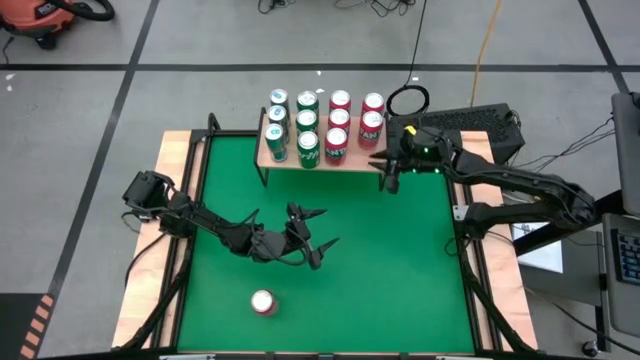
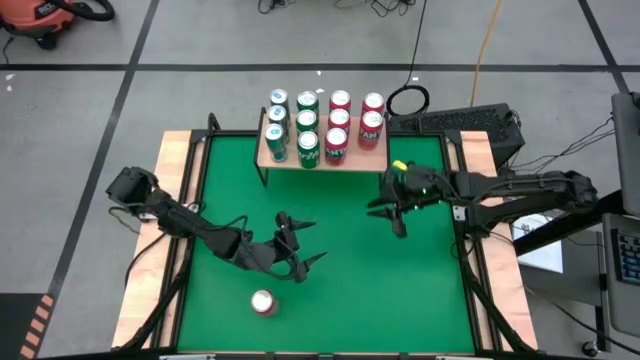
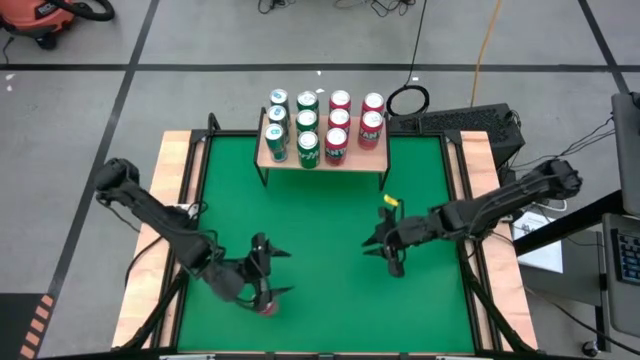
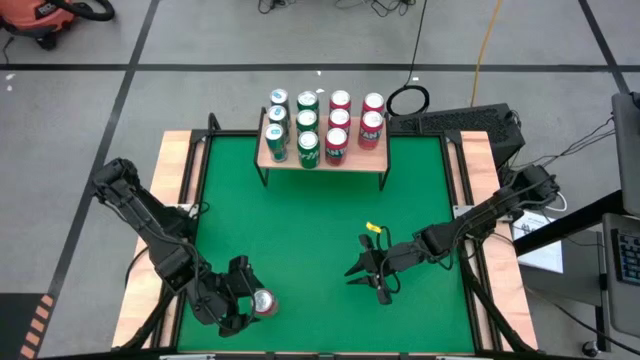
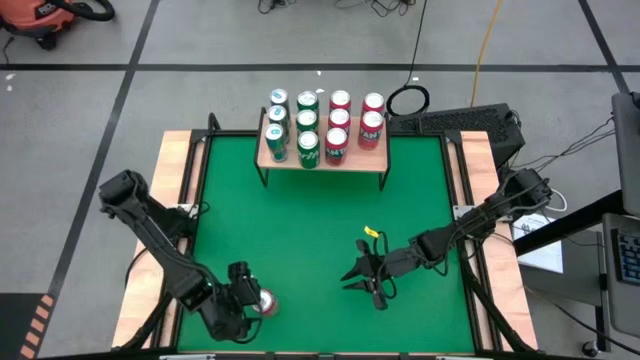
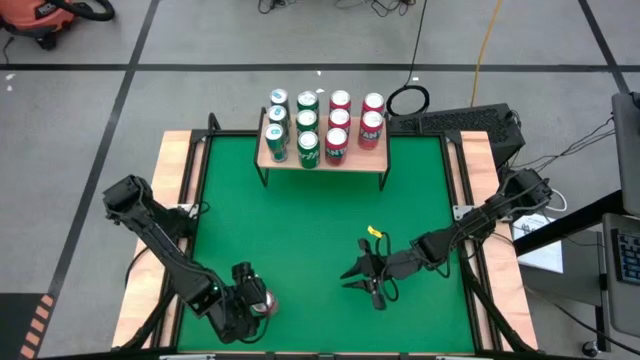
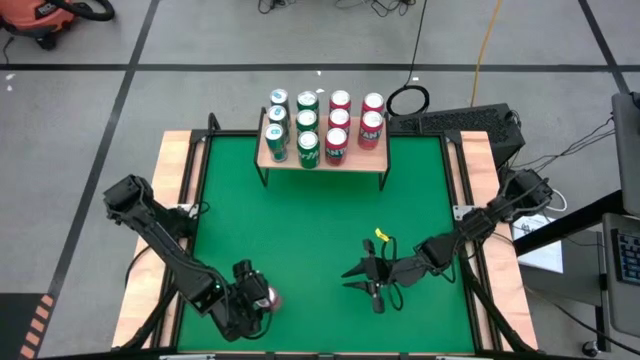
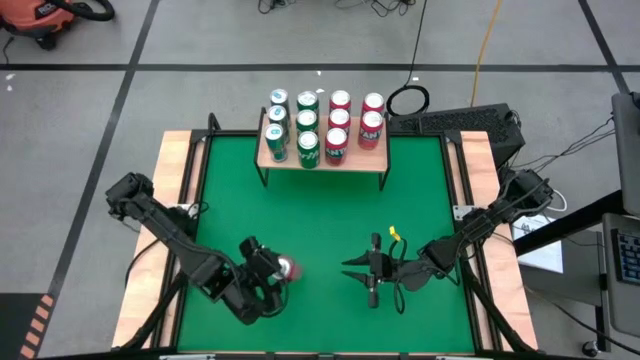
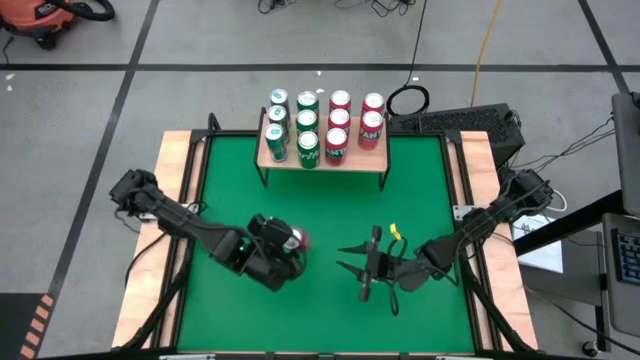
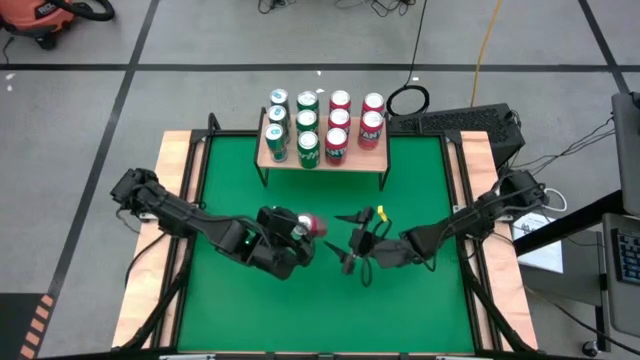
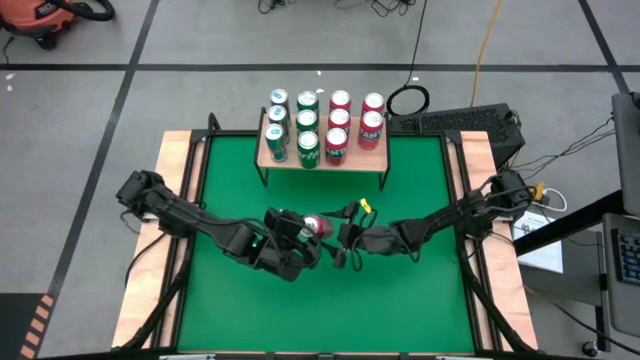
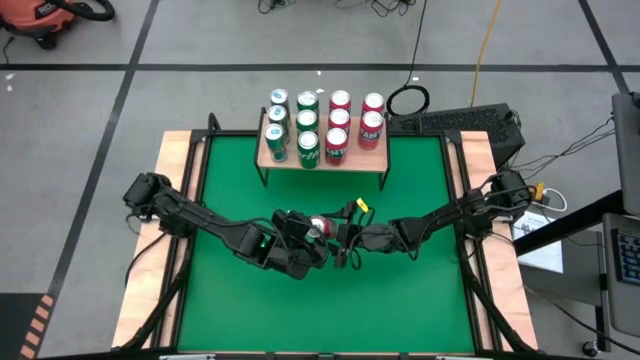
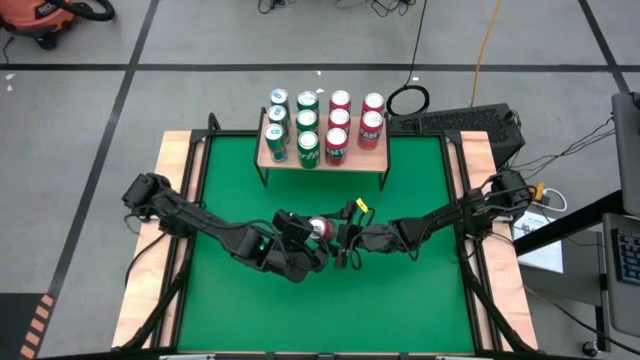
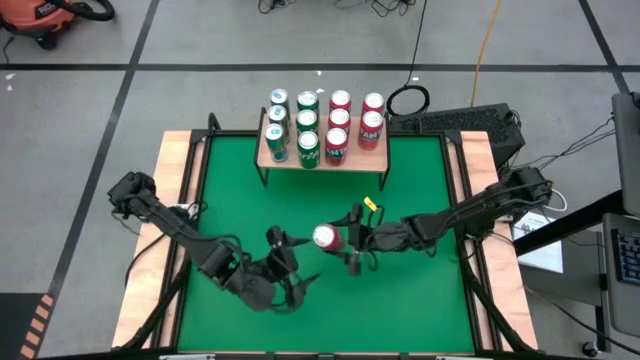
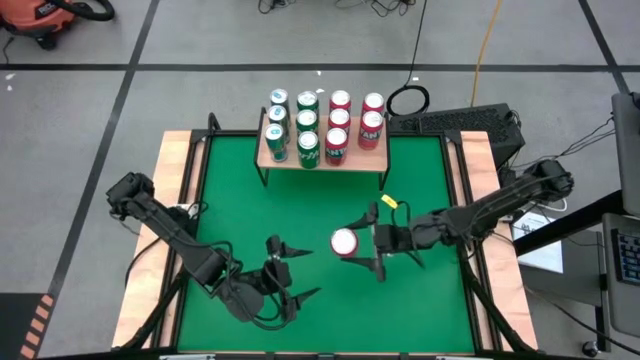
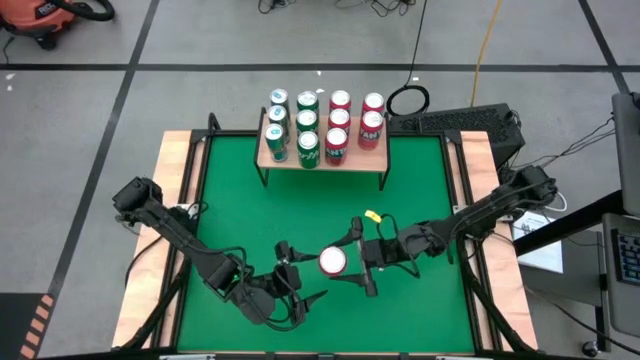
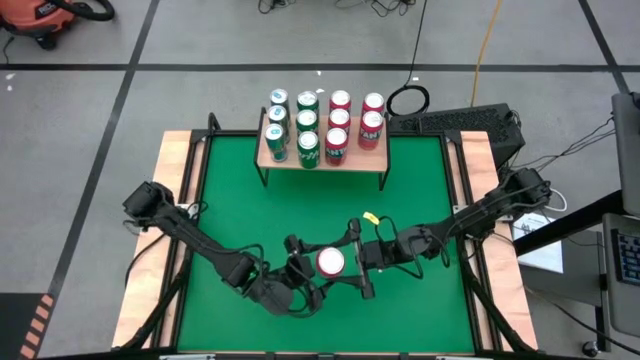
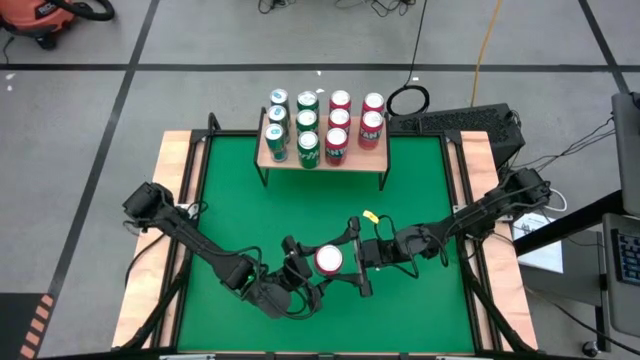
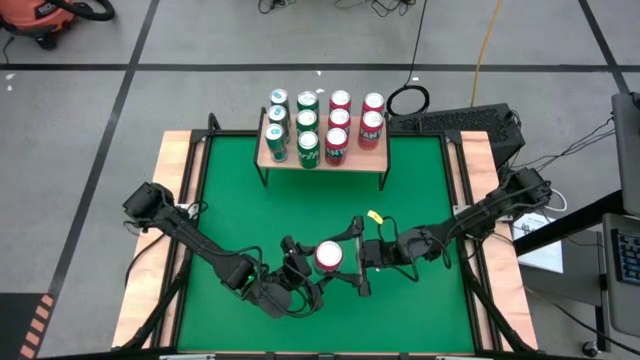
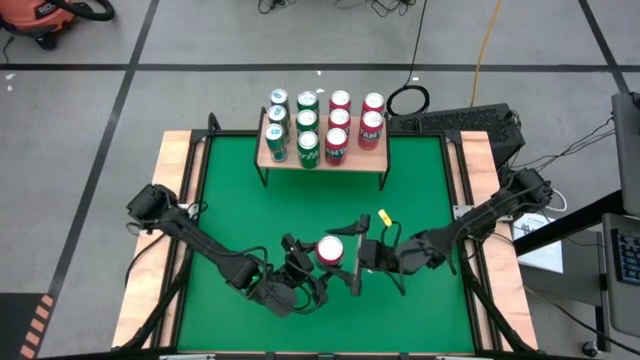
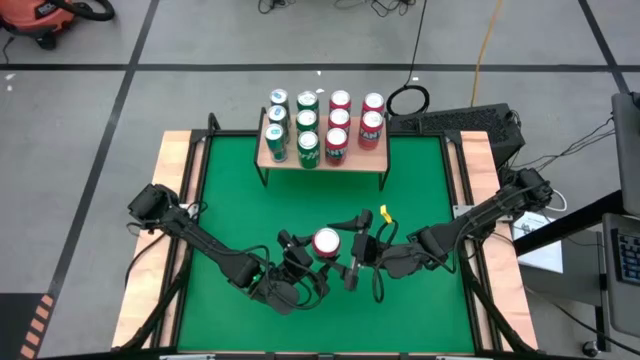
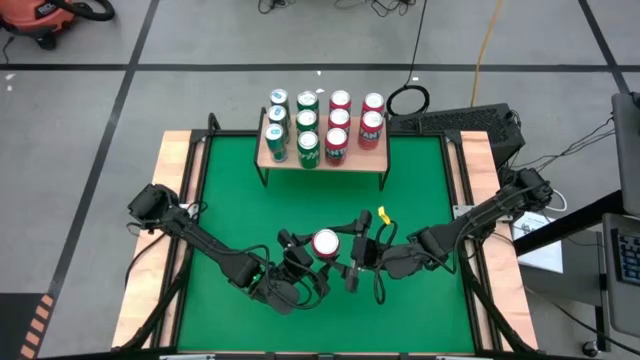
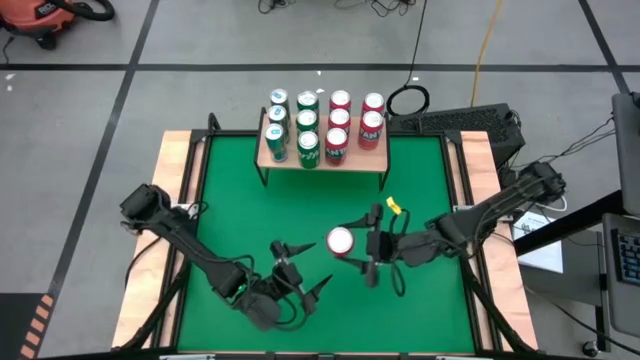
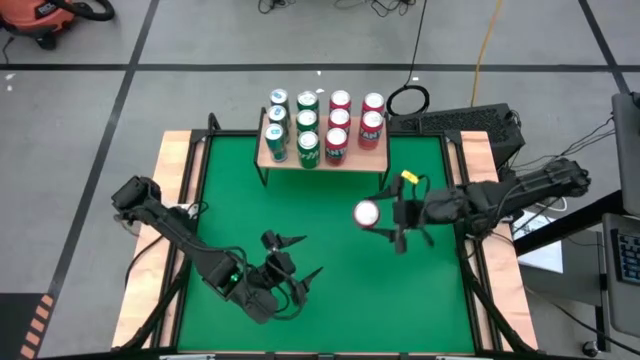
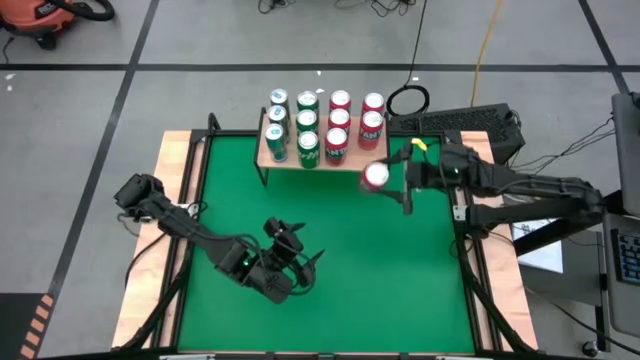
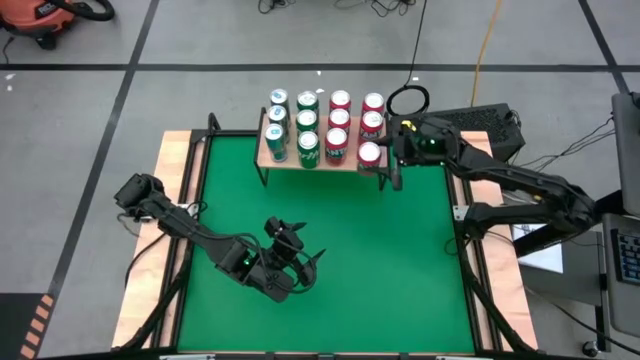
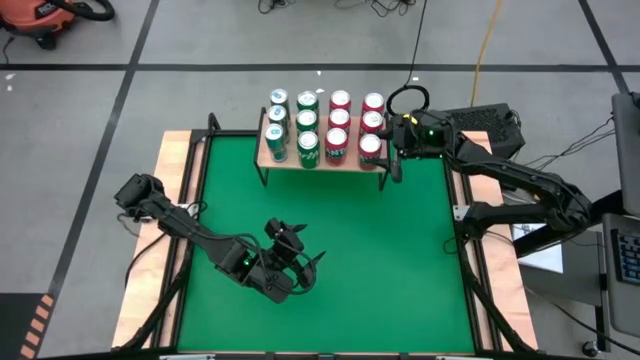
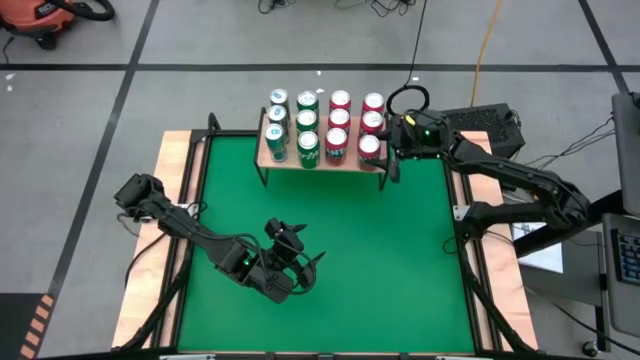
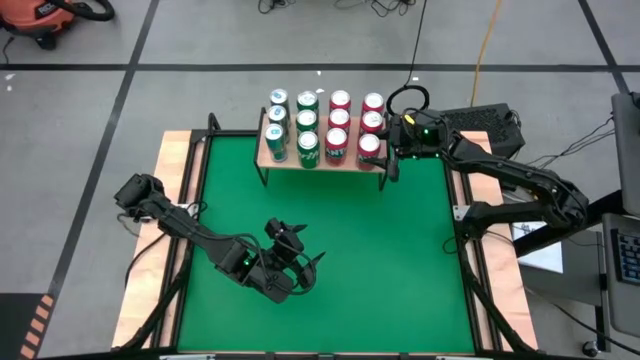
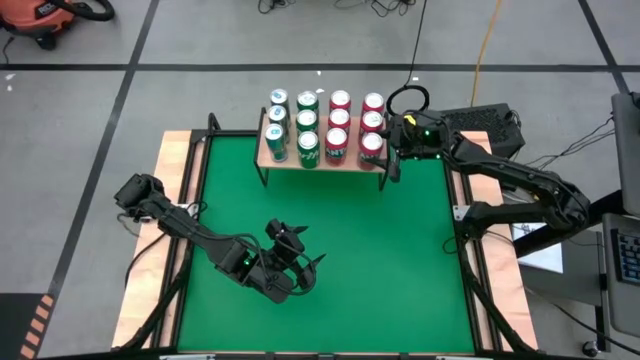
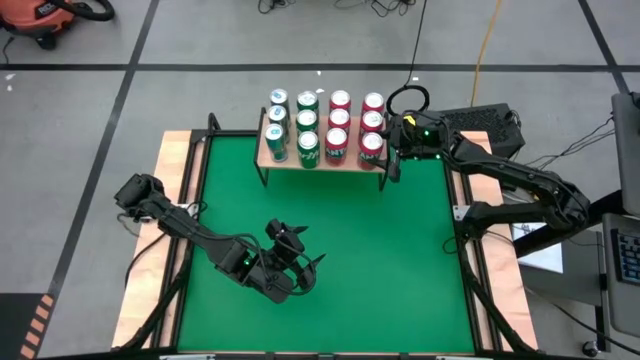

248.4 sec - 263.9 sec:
Task: Place canned beverage on shelf
Put the orange soda can on the shelf aligned with the other orange soda can

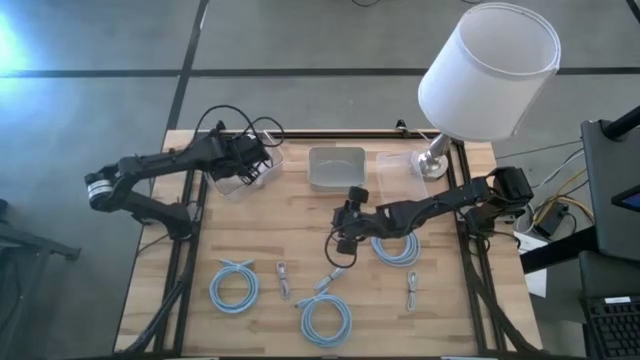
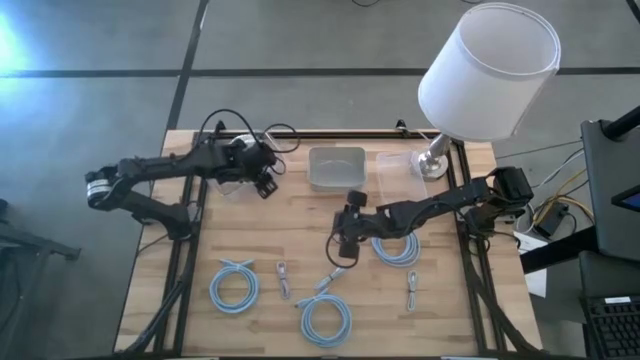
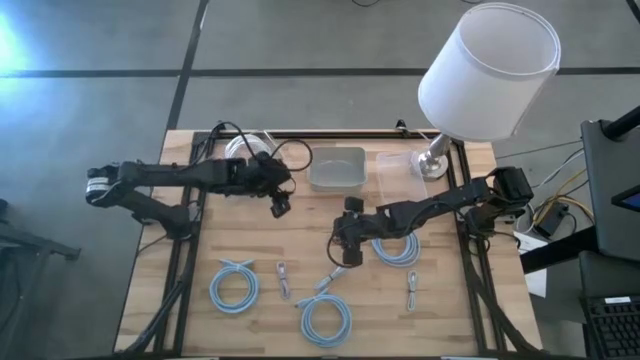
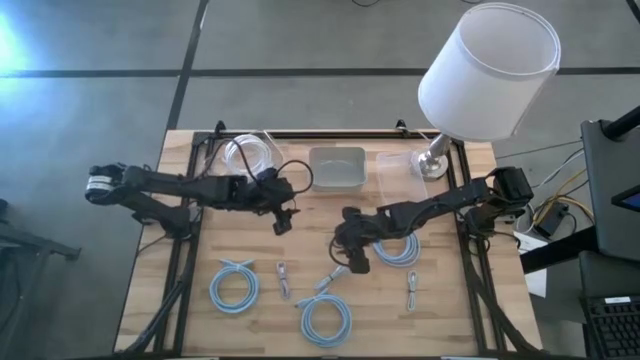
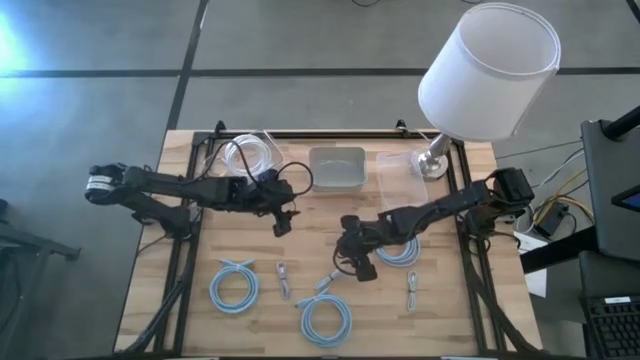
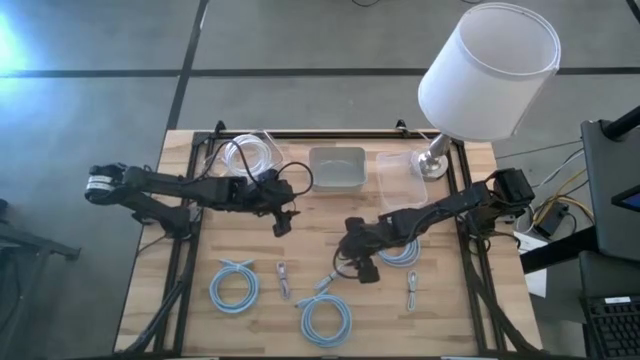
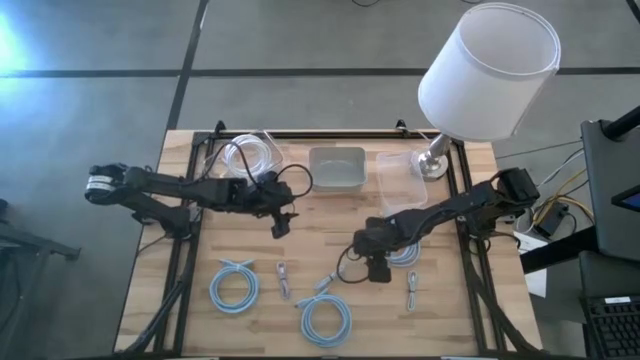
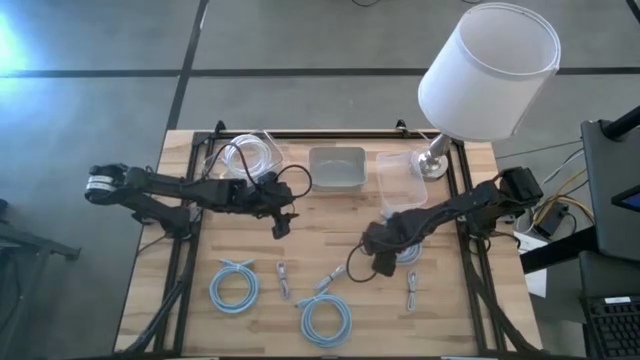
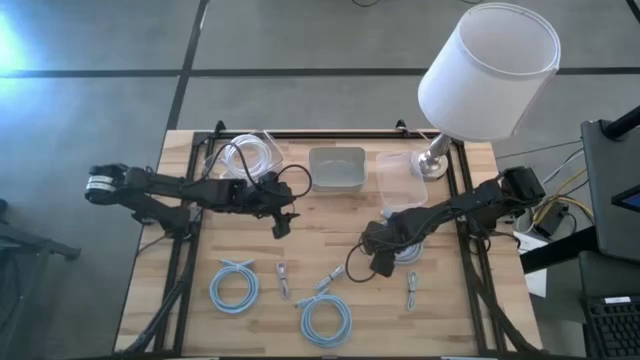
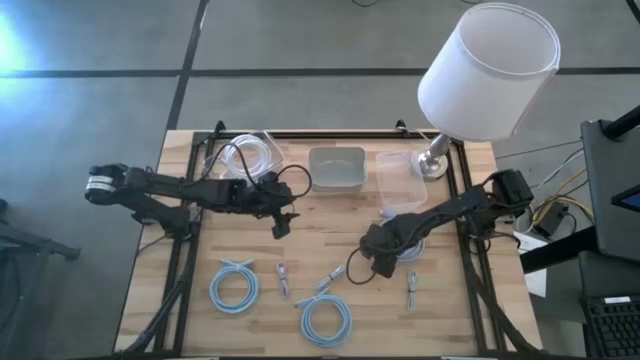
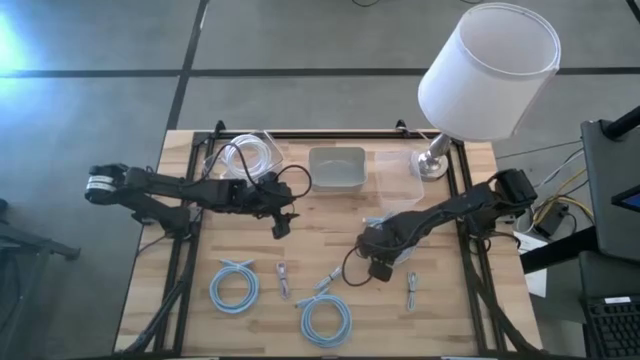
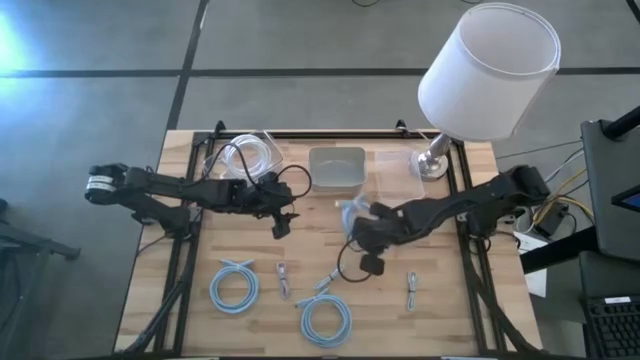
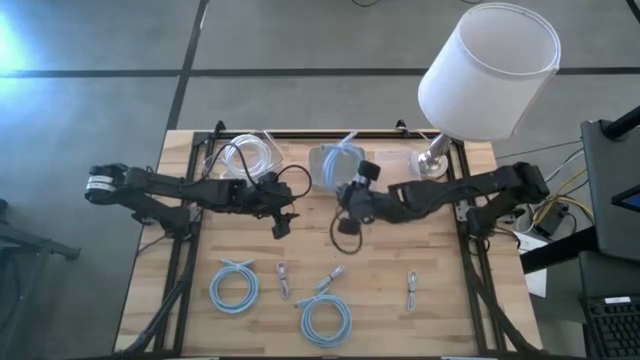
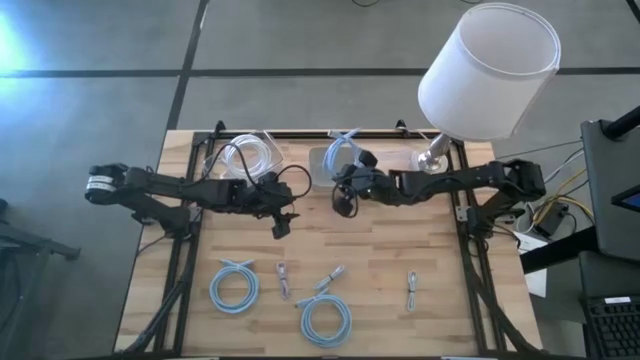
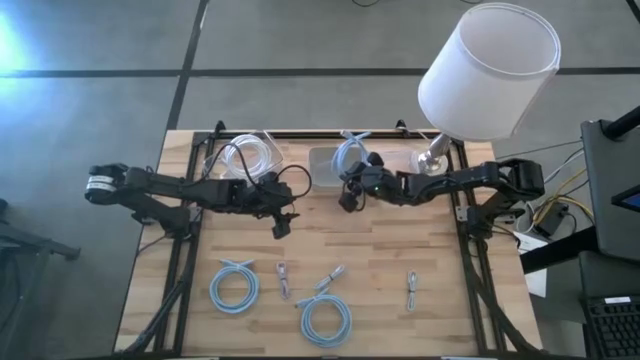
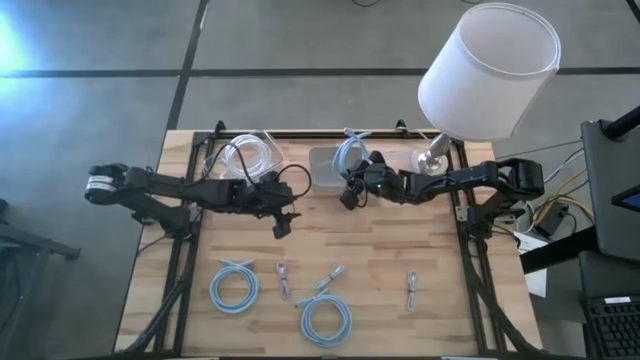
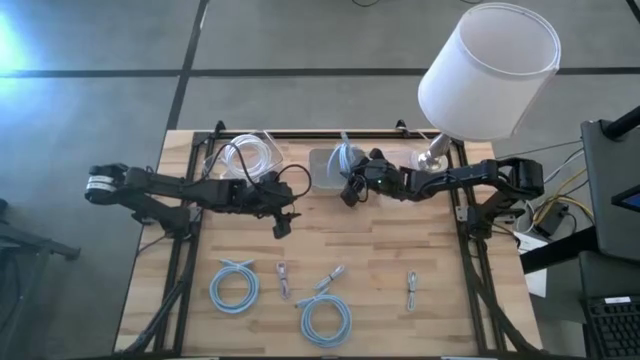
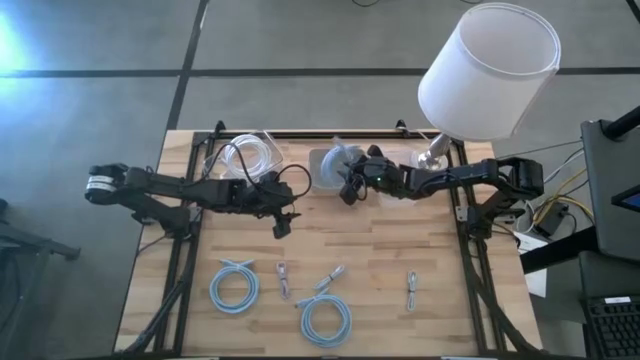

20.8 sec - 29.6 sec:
Task: Pick & Place USB Port
Put the top right large blue charger cable into the gray bin
